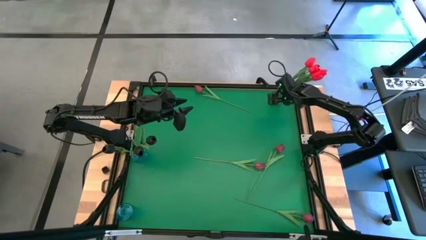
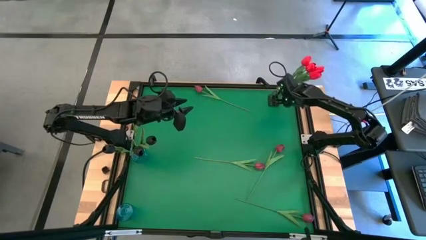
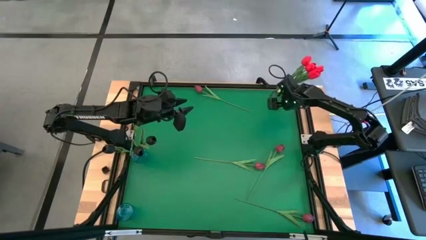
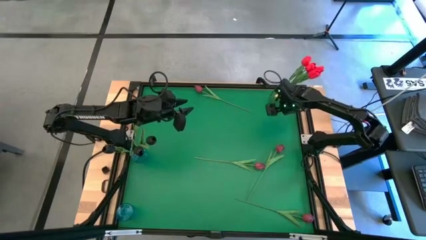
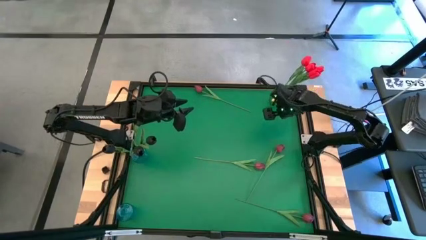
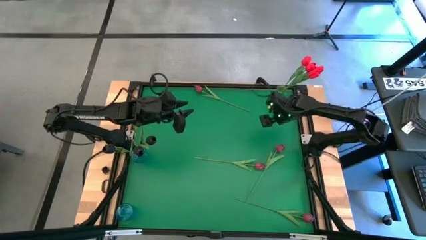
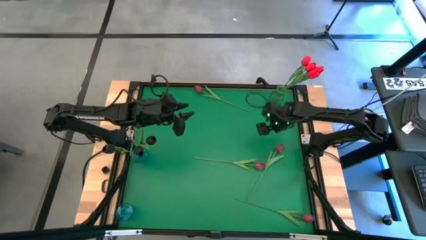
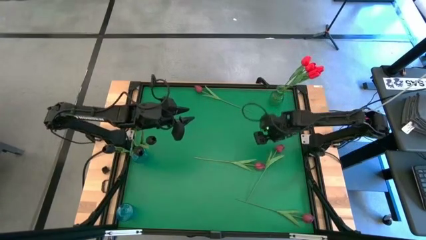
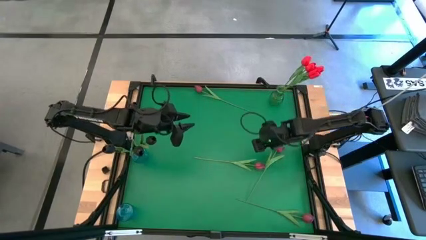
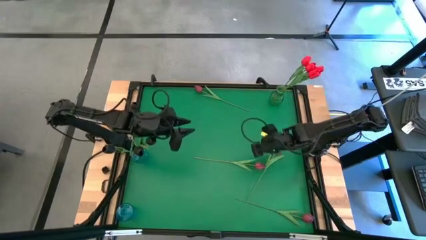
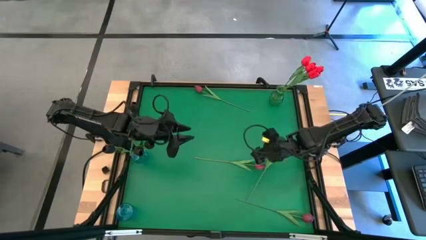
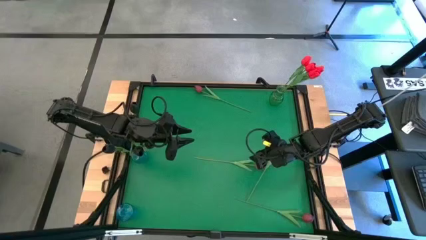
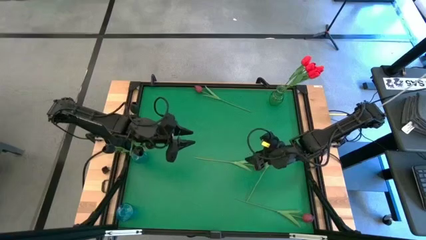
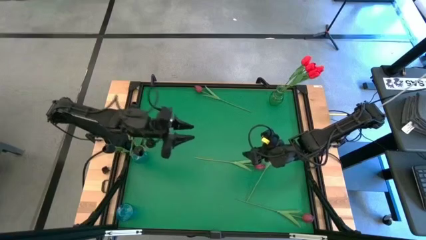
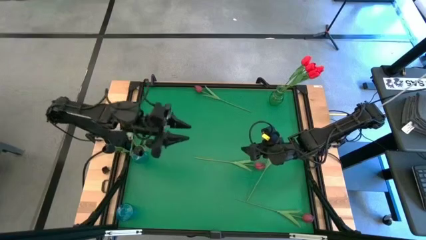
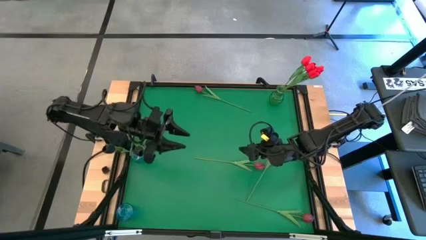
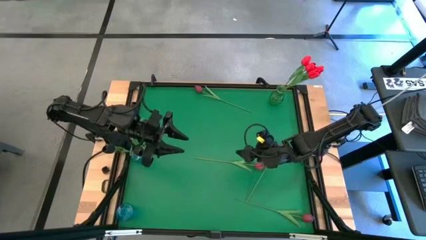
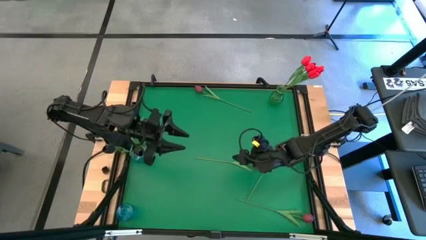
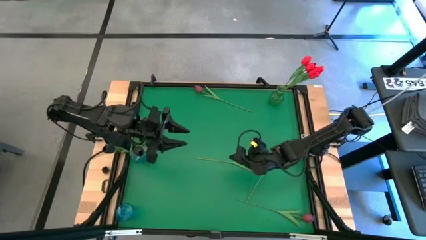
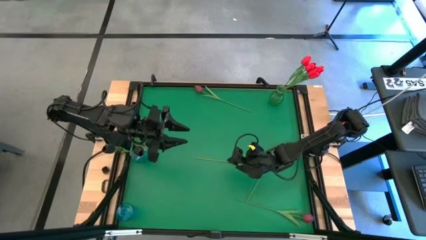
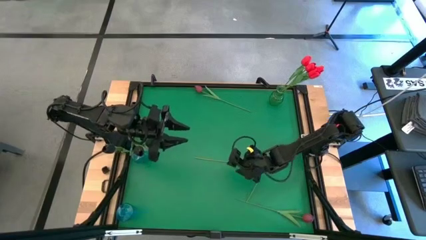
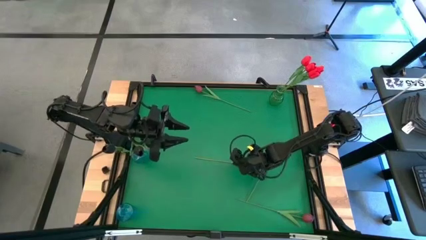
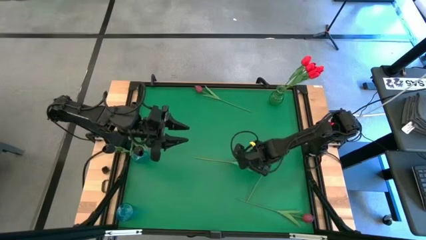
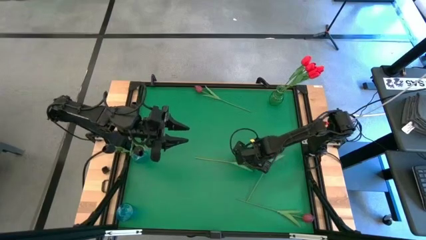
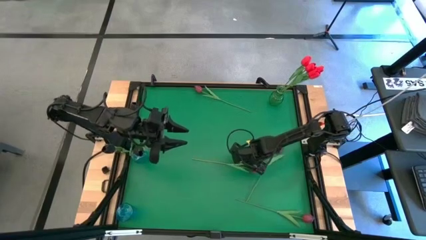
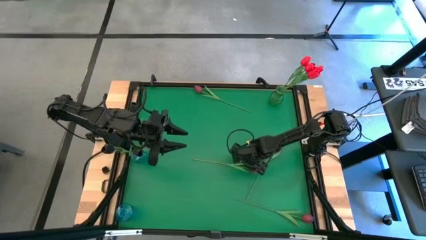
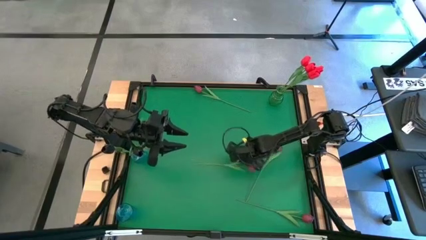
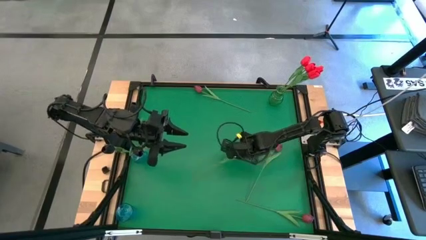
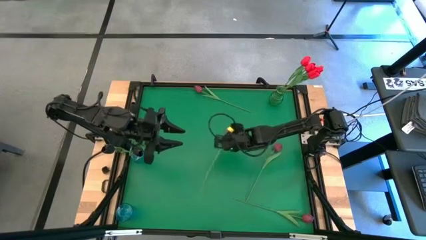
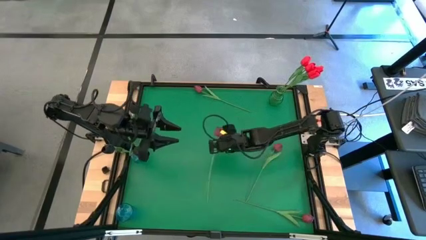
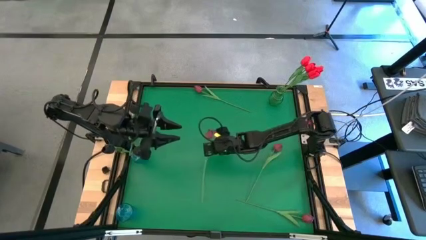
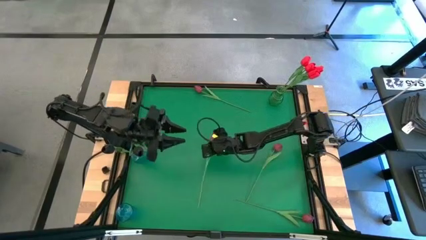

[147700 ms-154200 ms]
Task: Sort flowers into vase by color
Adjust the pink tulip

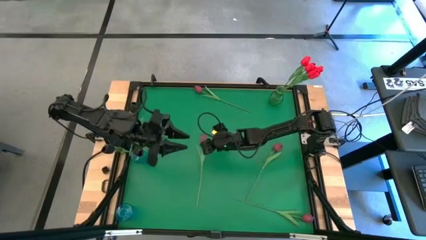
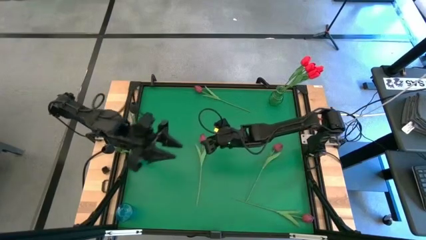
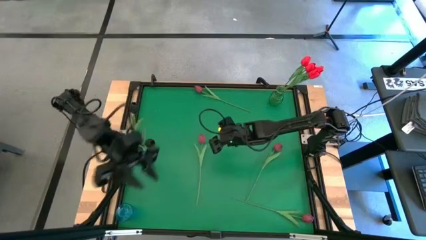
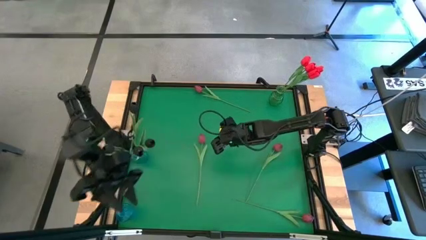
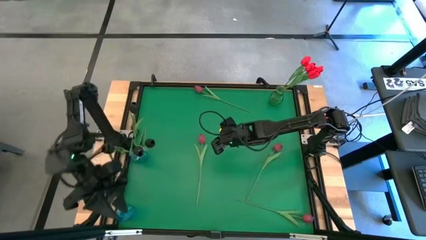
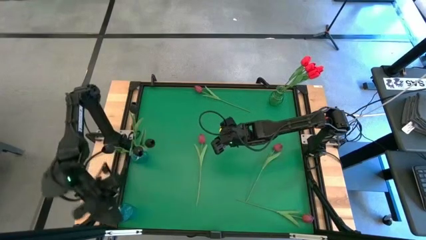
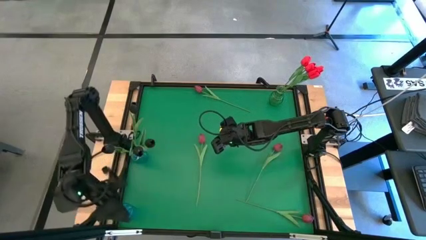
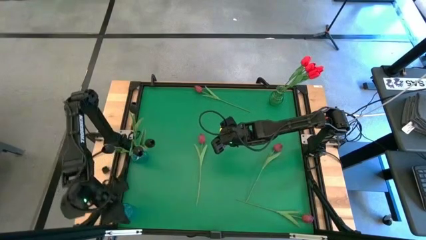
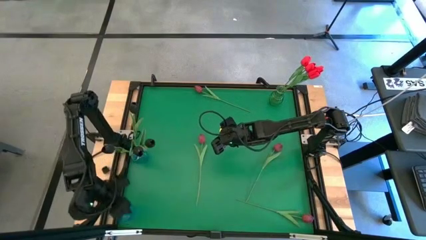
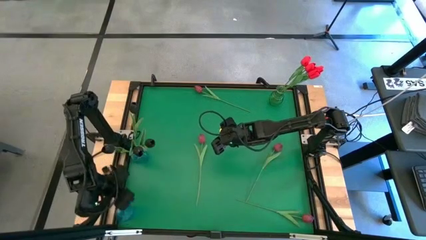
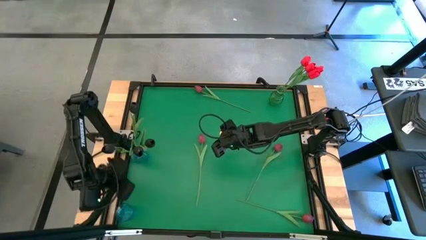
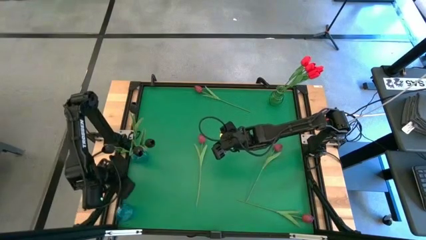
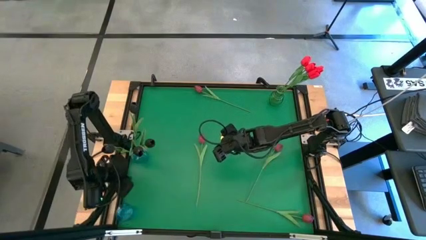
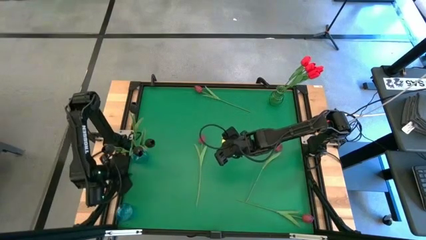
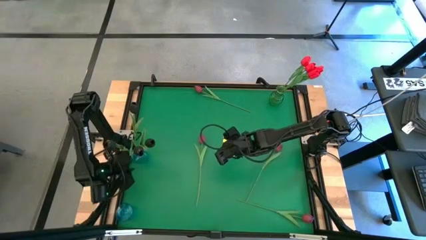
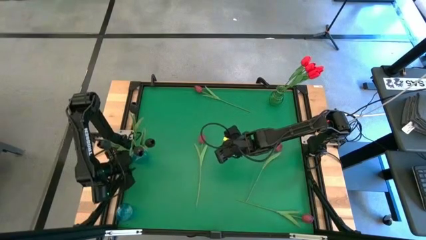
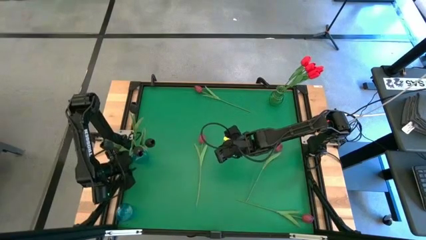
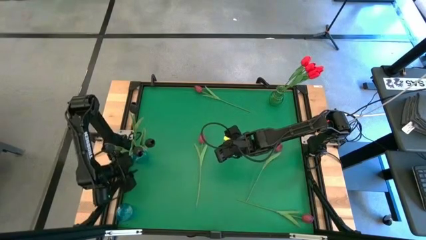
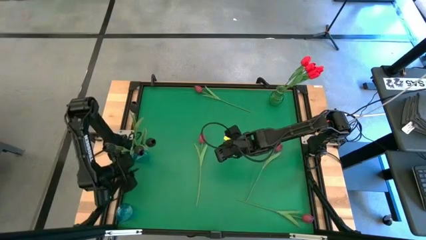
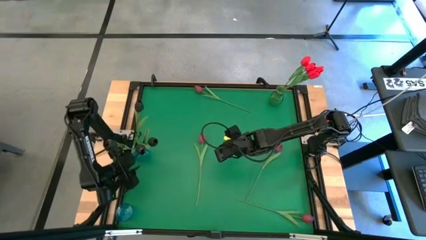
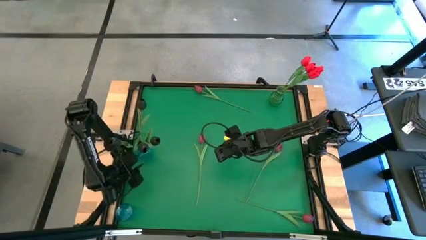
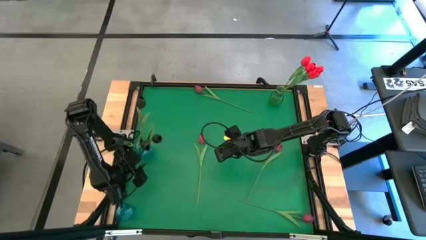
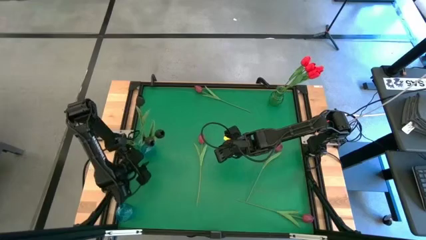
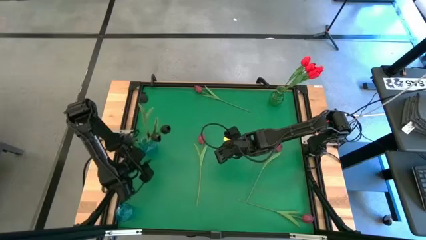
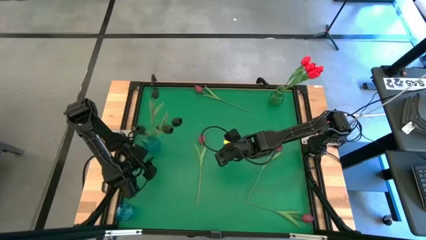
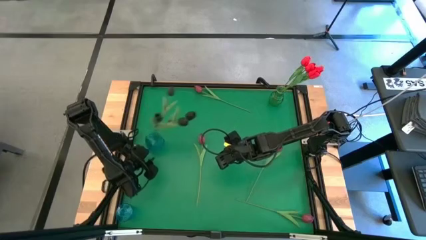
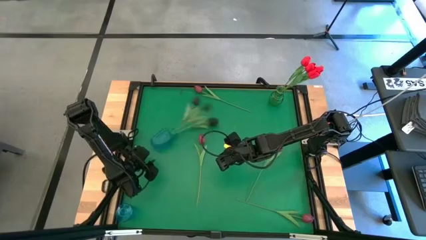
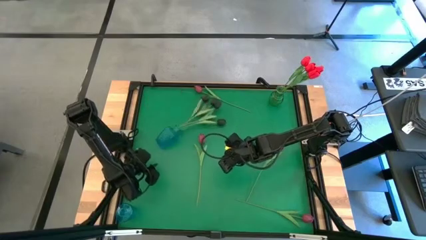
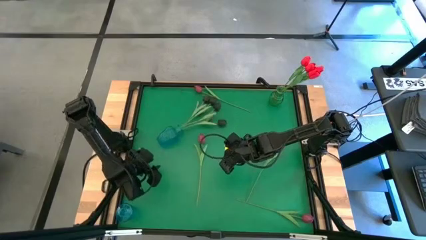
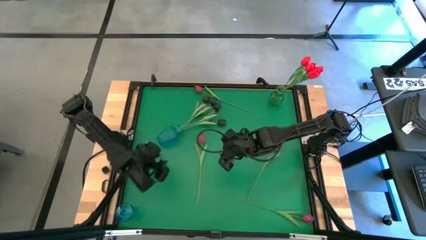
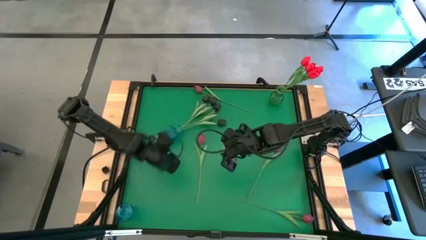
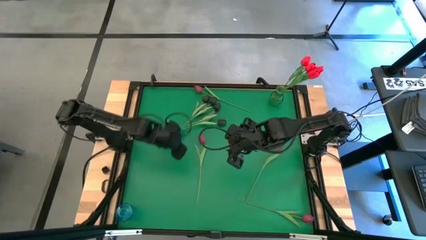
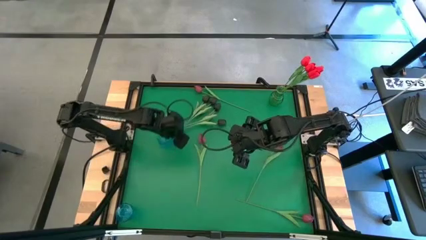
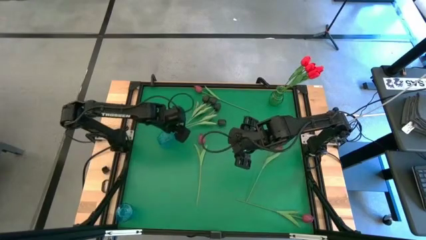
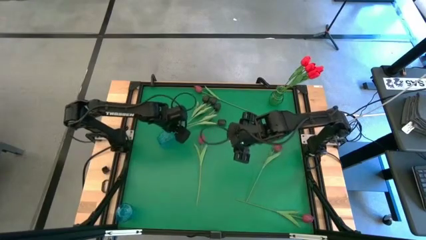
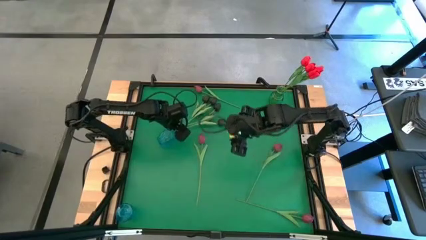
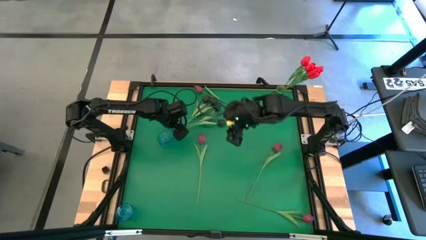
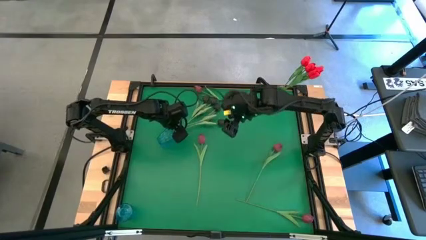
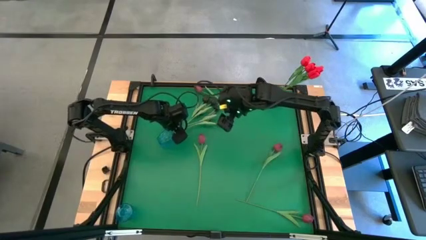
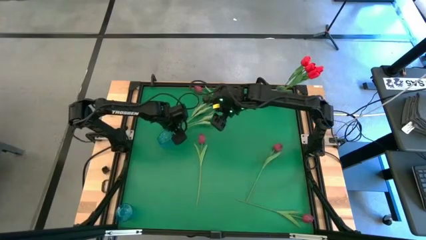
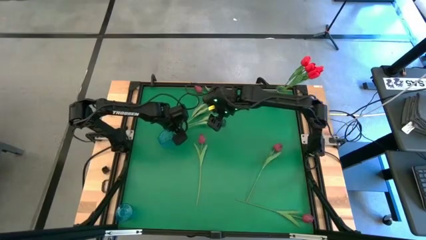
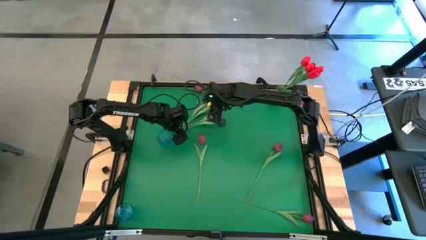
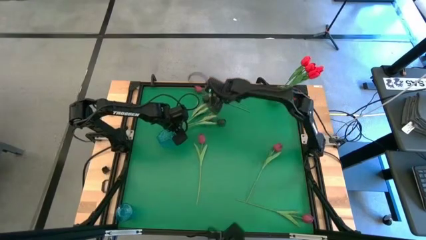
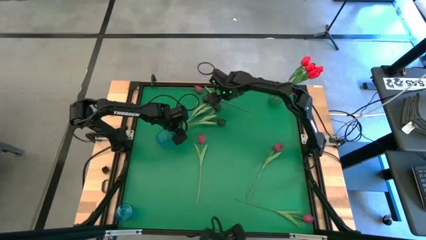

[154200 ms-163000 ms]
Adjust the top blue vase

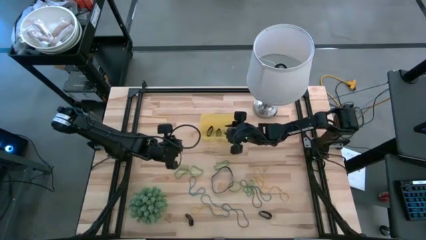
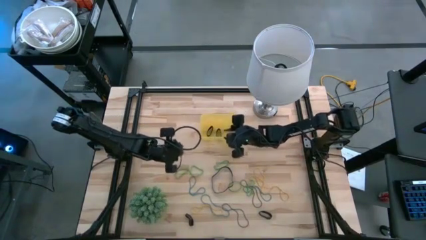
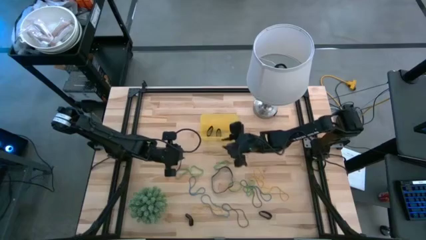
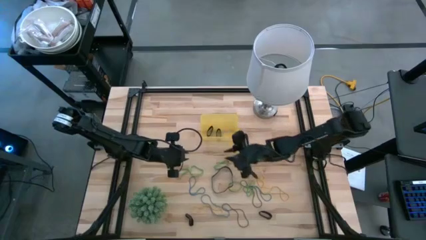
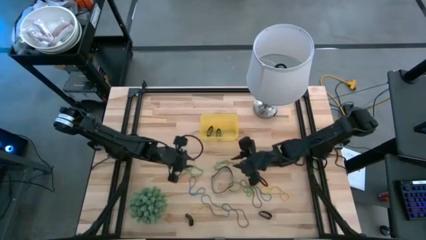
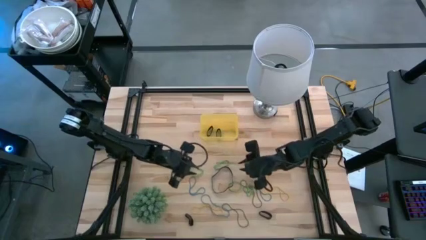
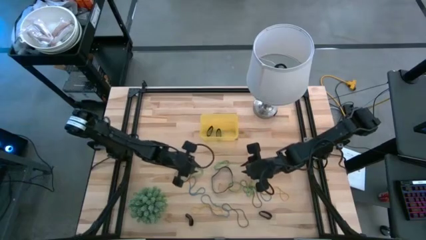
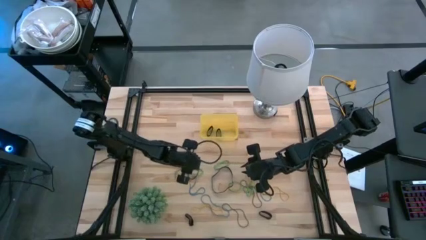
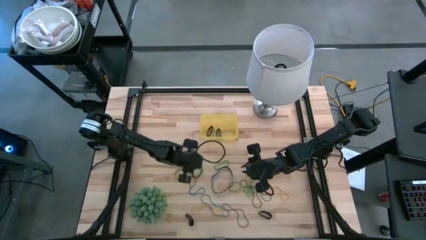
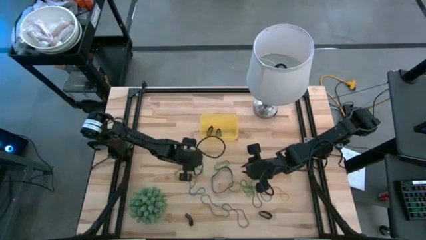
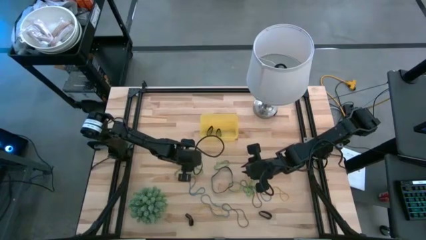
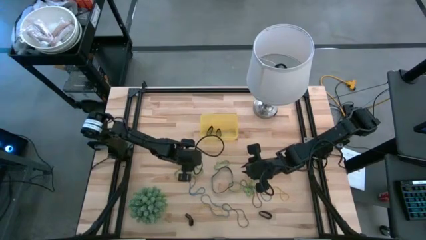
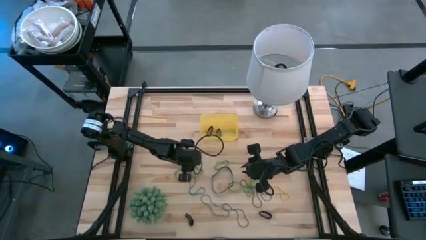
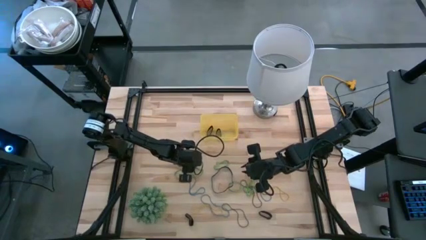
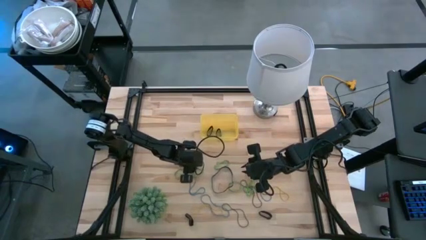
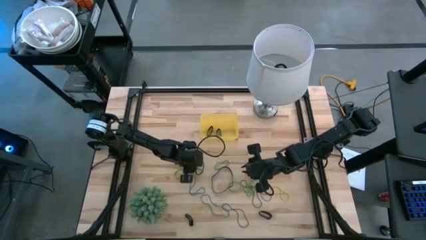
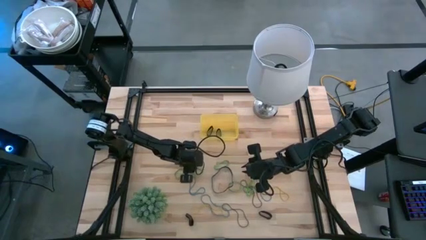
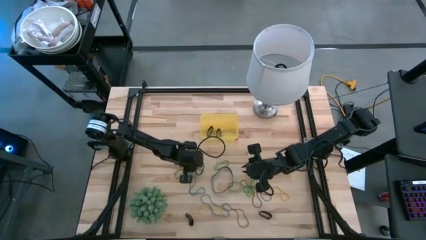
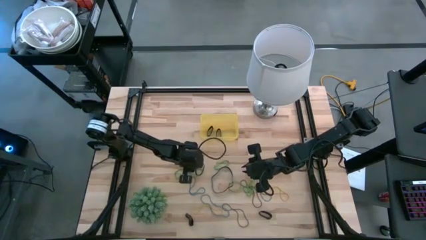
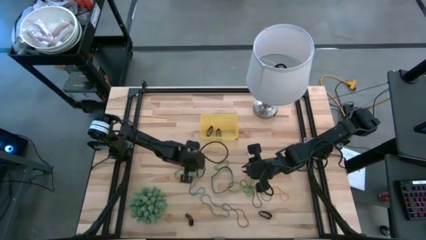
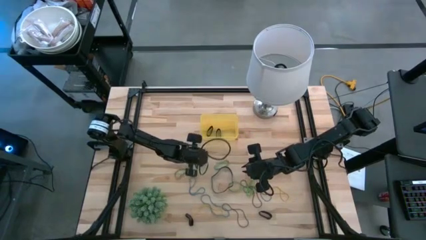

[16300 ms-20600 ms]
Task: Pick and place rubber bands into bin
Put the green rubber band into the yellow bin
